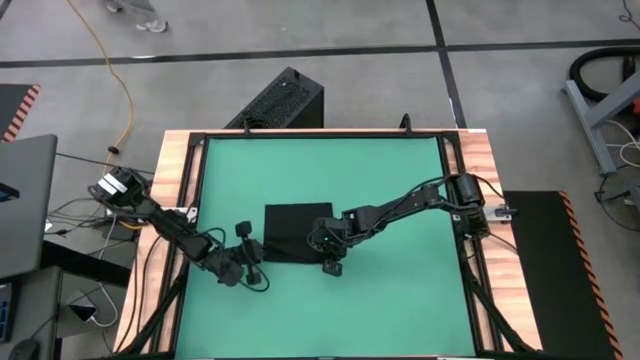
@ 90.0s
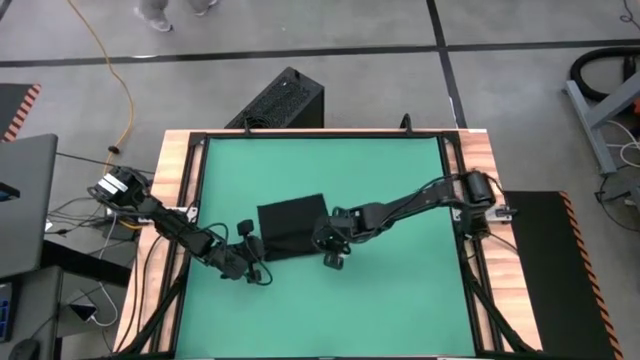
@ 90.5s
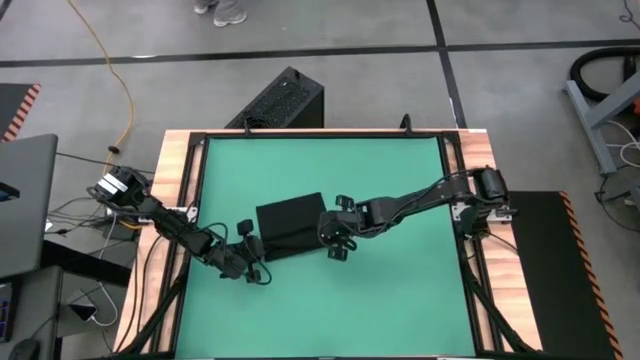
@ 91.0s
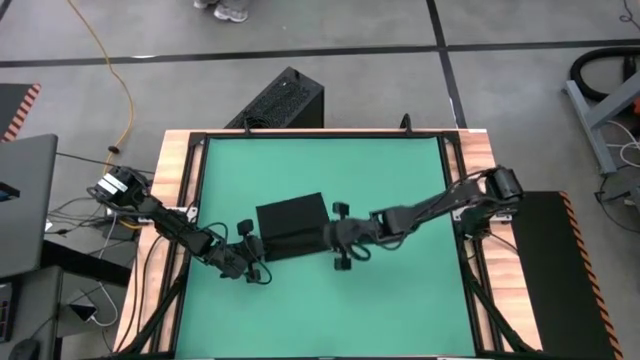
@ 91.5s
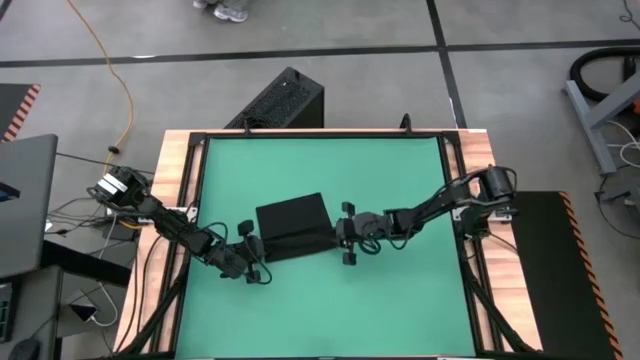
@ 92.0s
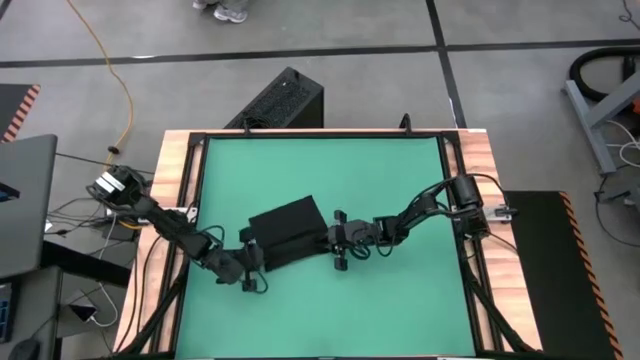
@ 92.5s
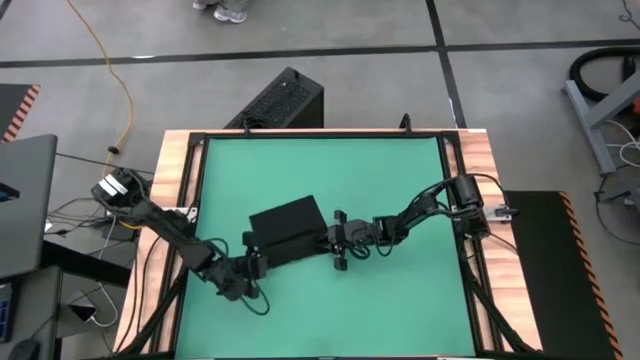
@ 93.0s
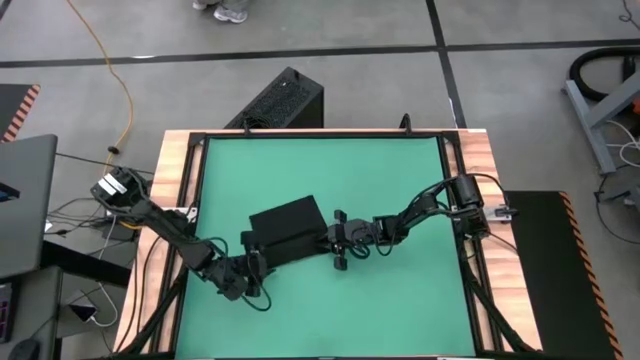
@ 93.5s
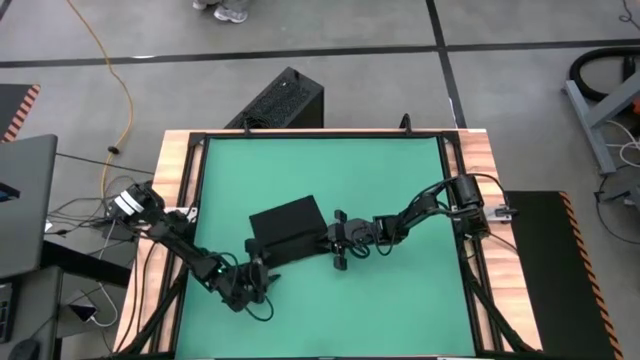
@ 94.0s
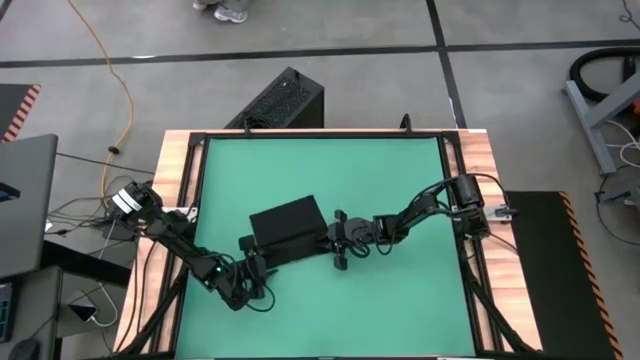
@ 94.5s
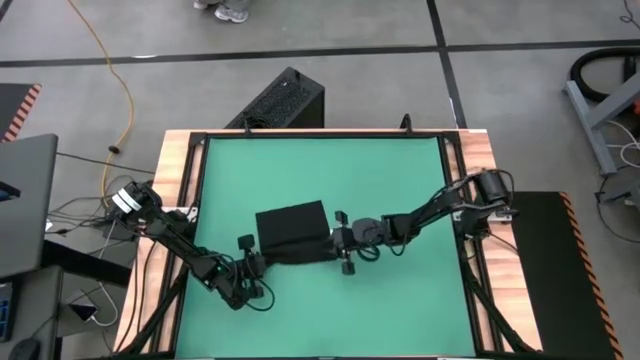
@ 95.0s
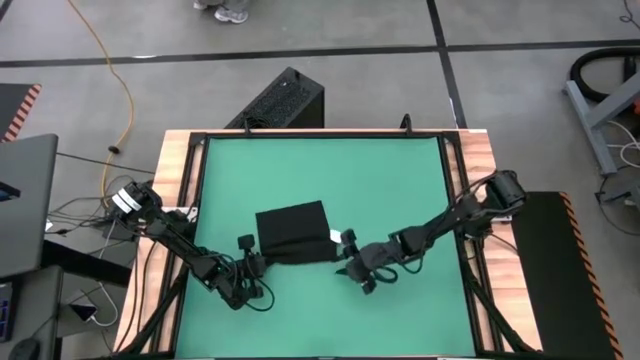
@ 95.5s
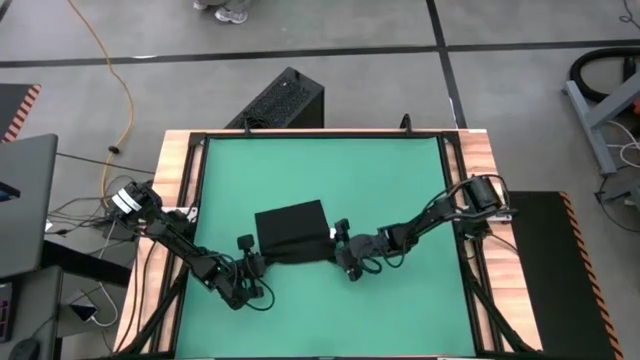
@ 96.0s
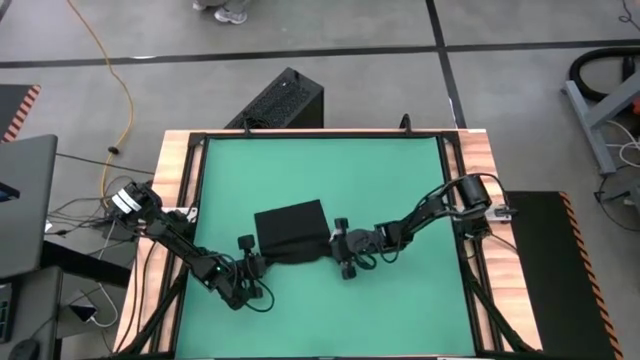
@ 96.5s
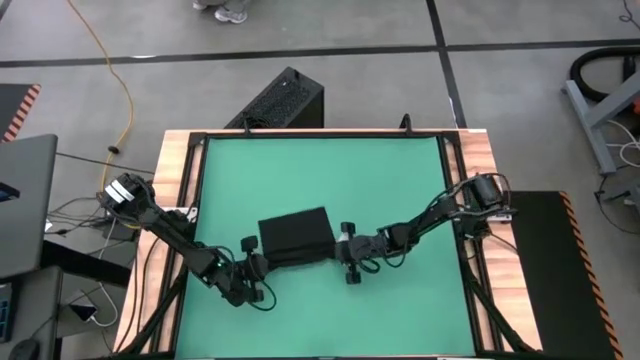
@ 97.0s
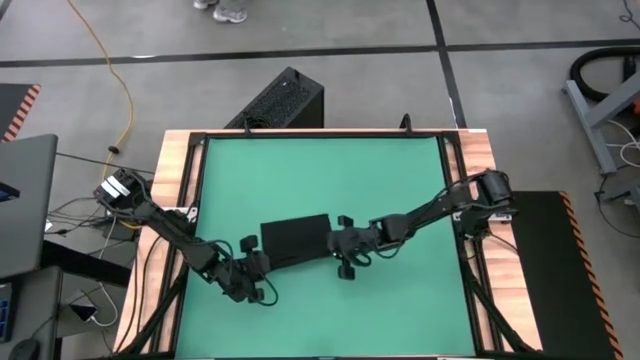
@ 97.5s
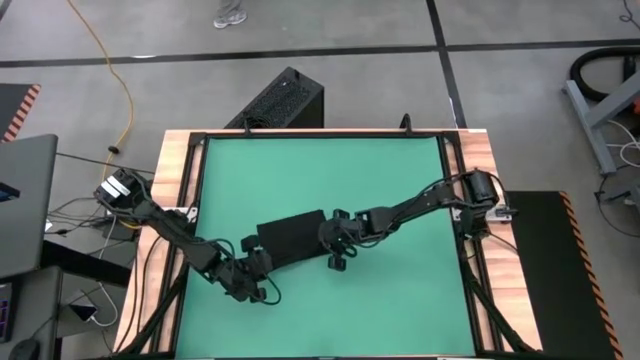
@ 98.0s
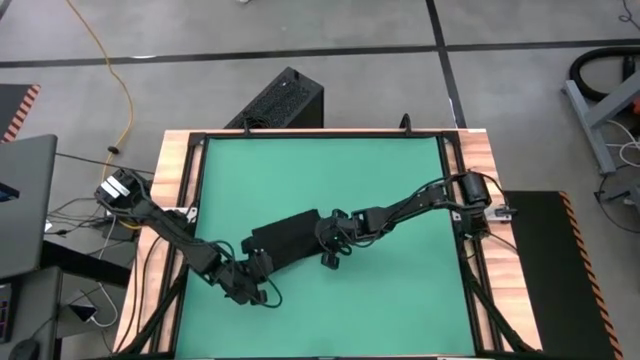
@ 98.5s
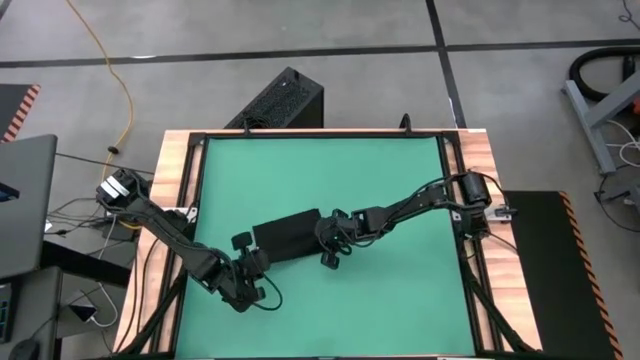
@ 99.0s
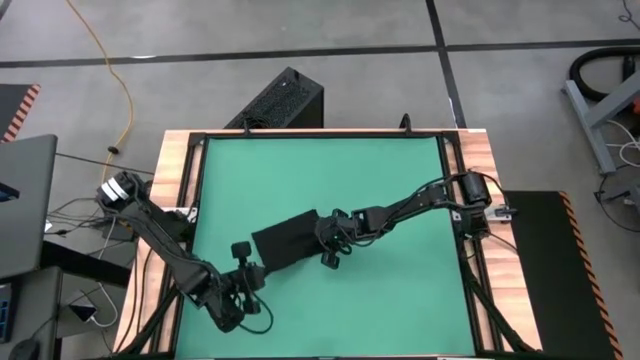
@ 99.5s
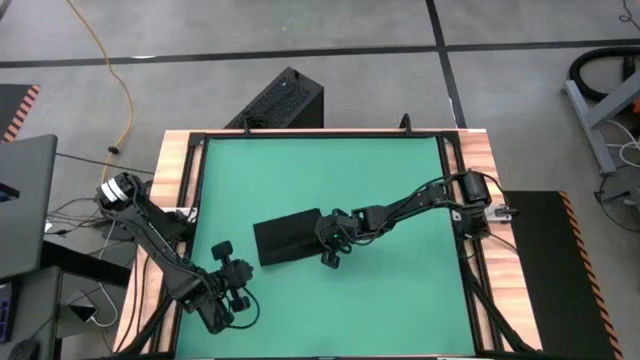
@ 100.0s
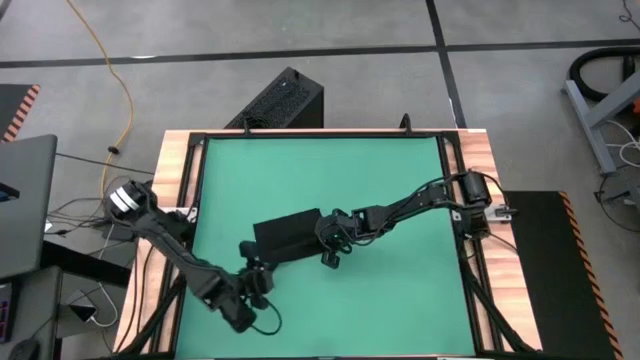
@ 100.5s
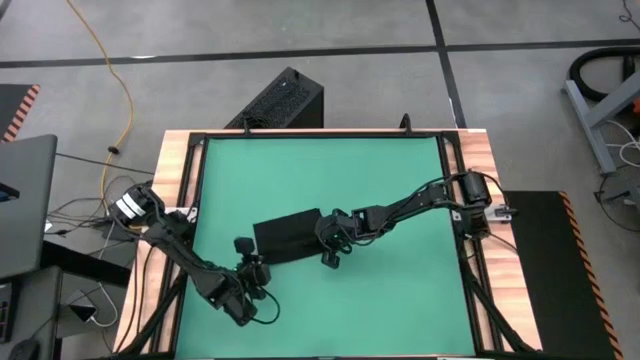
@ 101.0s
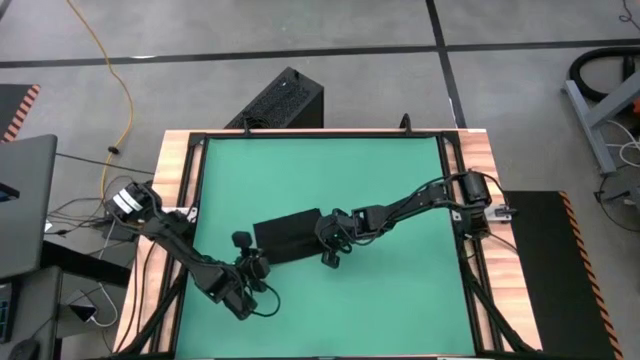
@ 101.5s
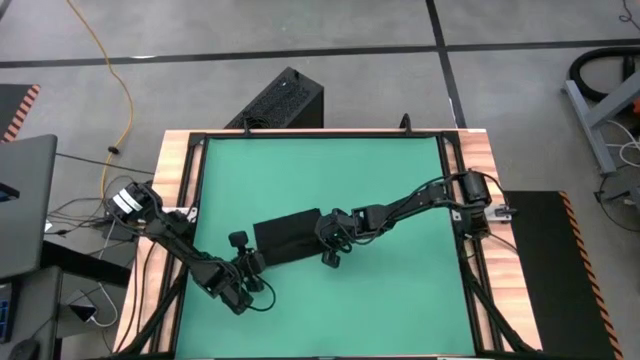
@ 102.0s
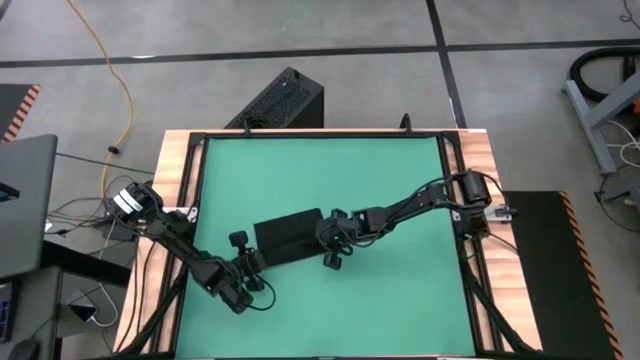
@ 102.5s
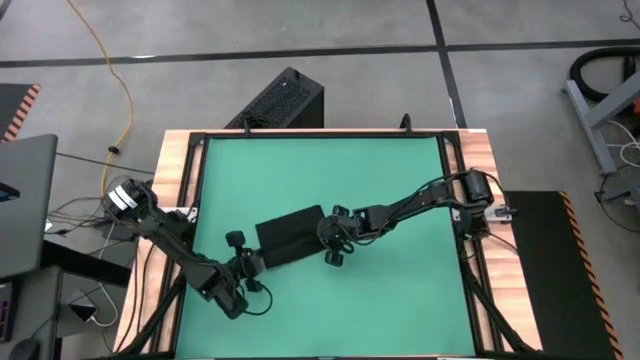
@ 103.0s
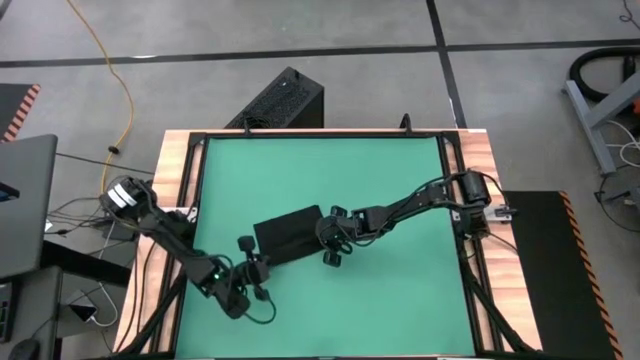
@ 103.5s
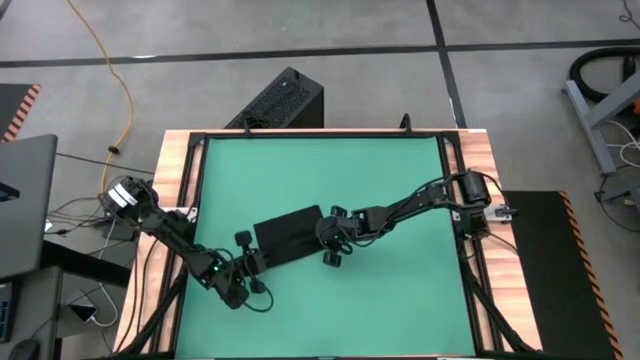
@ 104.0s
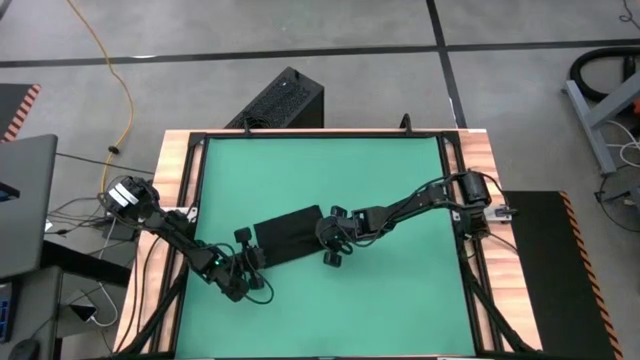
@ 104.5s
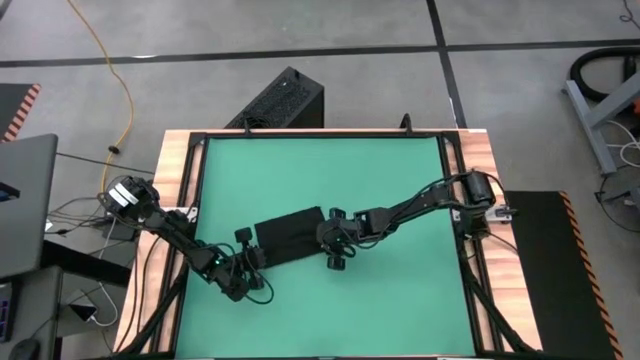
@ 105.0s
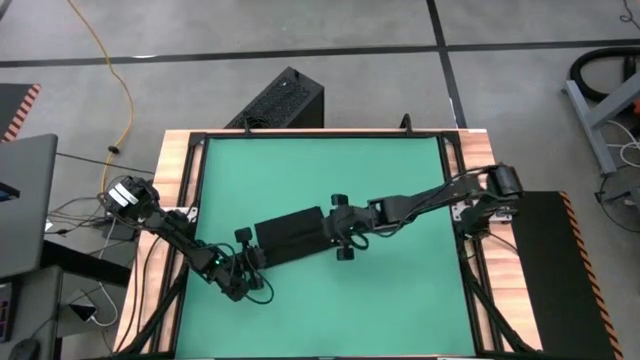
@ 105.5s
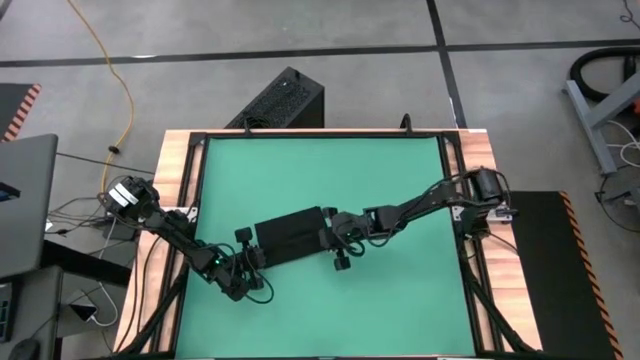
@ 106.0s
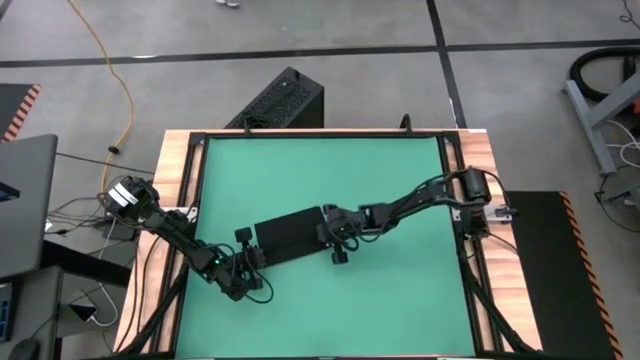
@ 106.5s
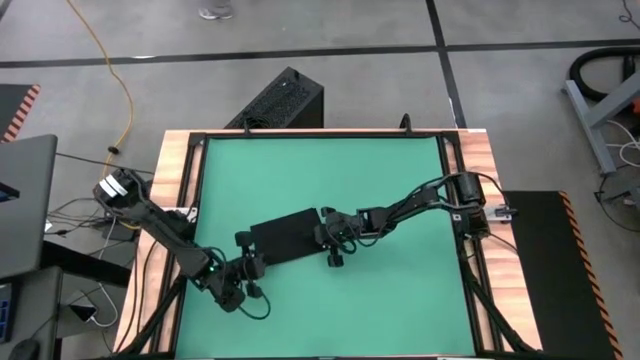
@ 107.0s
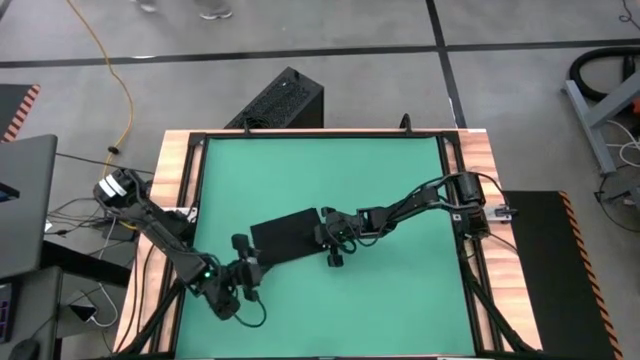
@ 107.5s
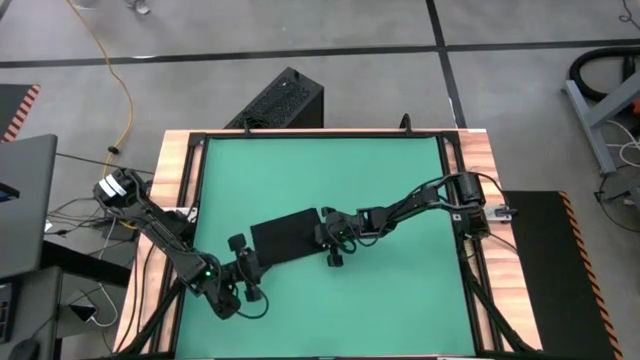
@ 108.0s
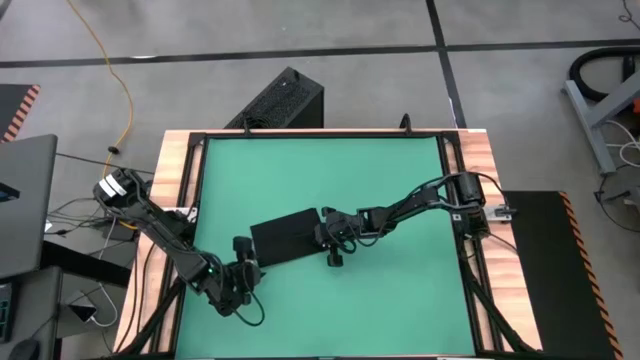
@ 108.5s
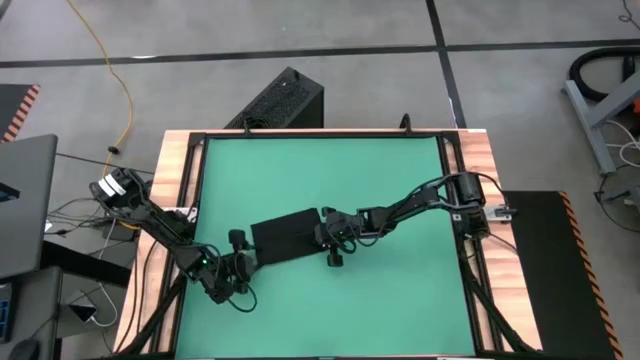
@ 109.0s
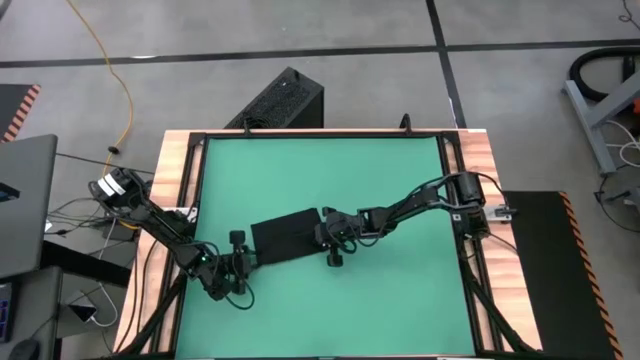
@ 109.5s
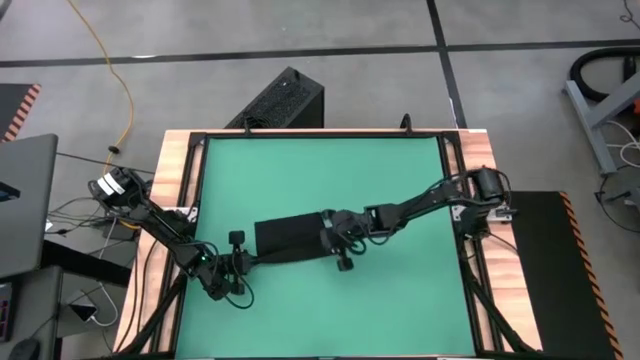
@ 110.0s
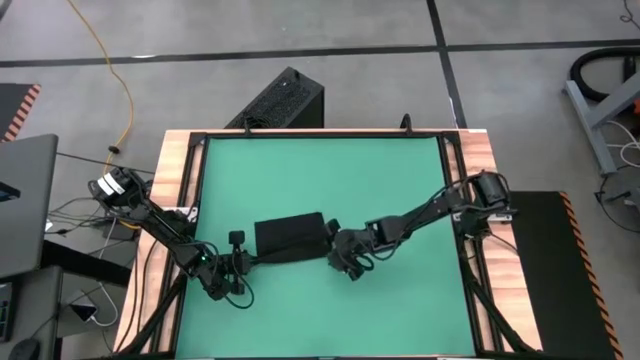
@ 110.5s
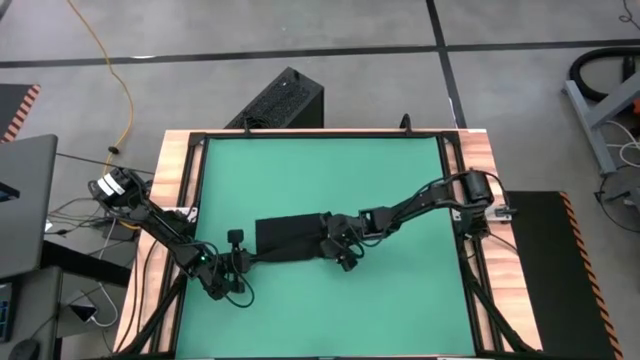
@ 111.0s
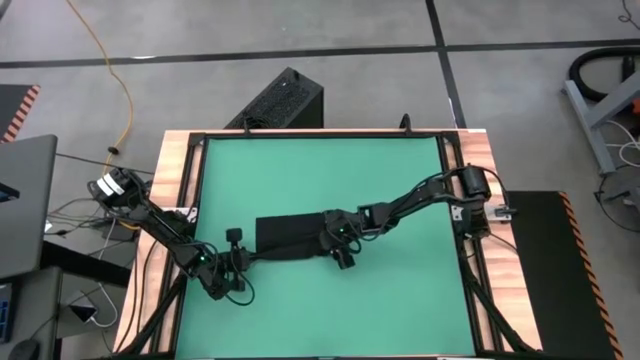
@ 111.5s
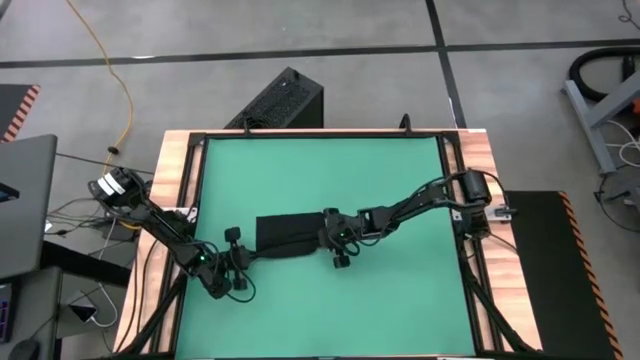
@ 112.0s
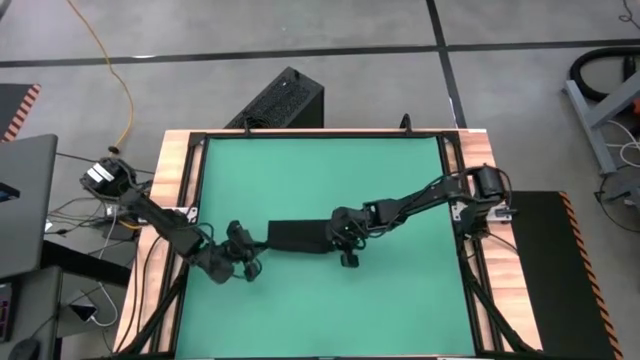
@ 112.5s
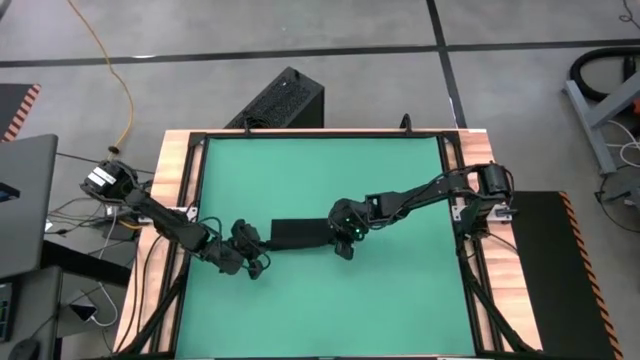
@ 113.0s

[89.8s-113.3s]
Task: Roll towel
Roll the black towel
